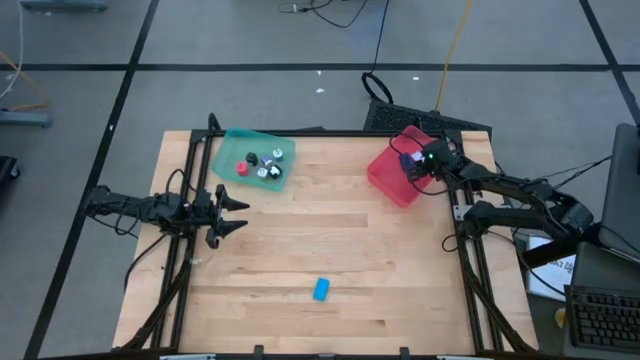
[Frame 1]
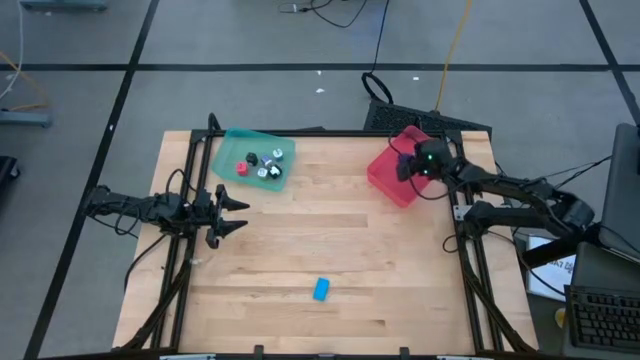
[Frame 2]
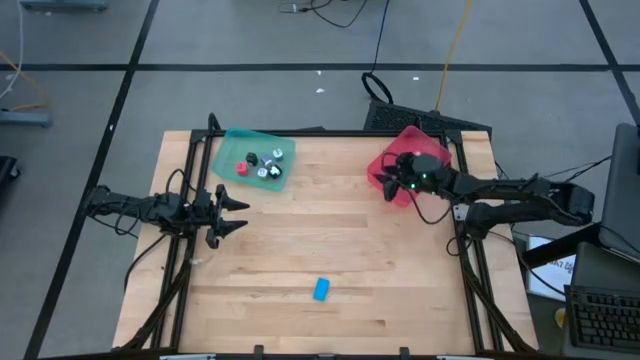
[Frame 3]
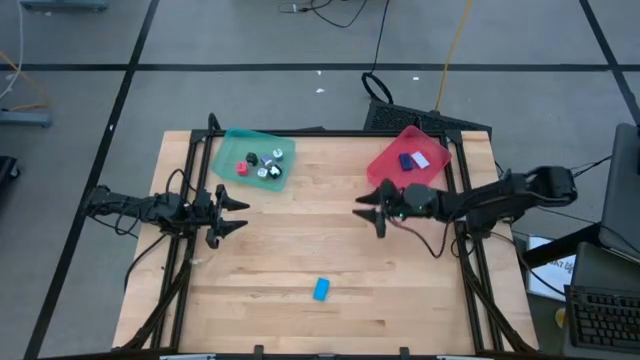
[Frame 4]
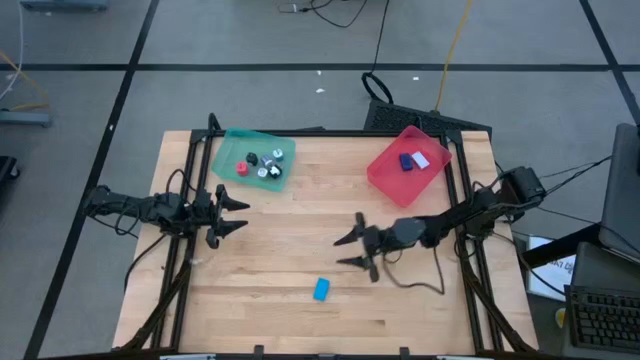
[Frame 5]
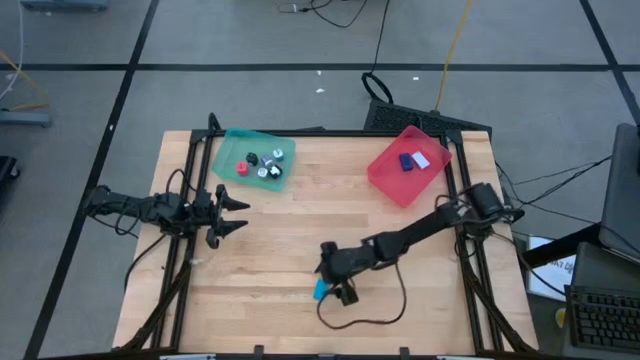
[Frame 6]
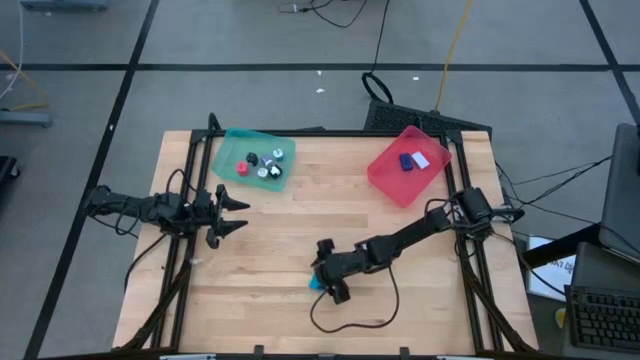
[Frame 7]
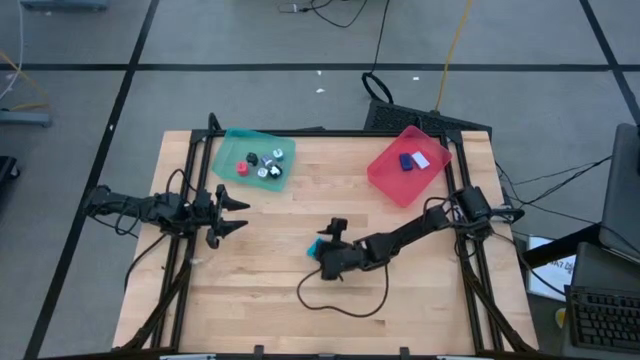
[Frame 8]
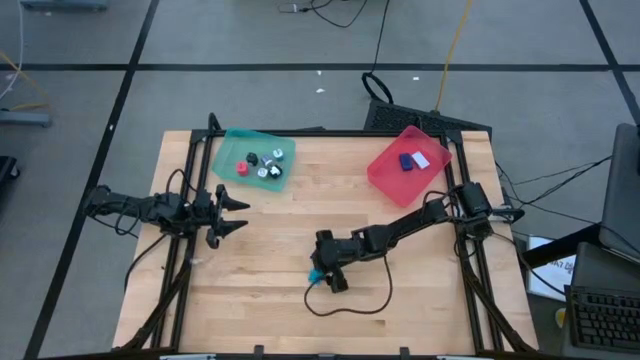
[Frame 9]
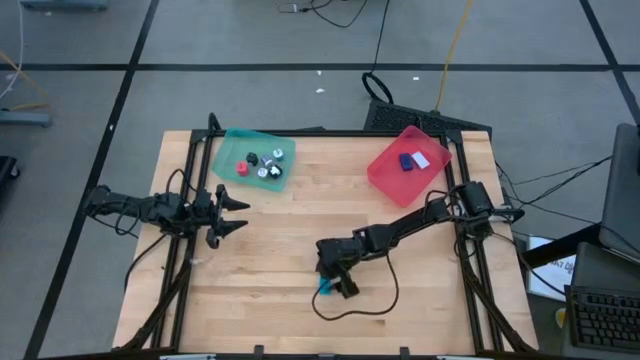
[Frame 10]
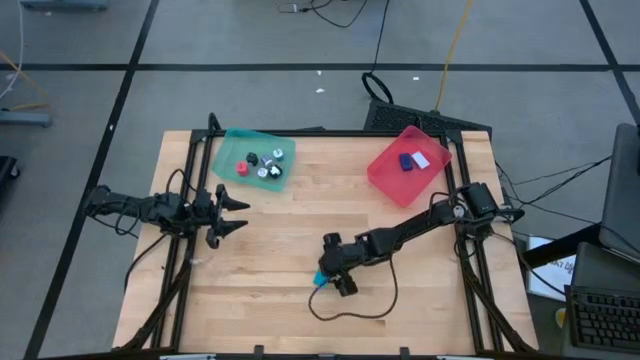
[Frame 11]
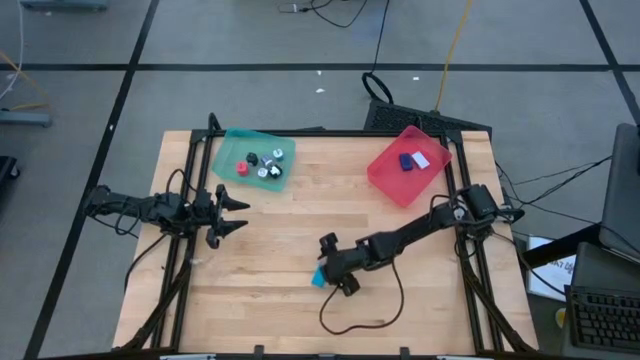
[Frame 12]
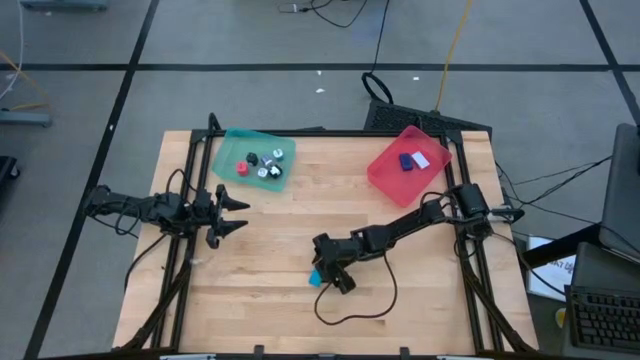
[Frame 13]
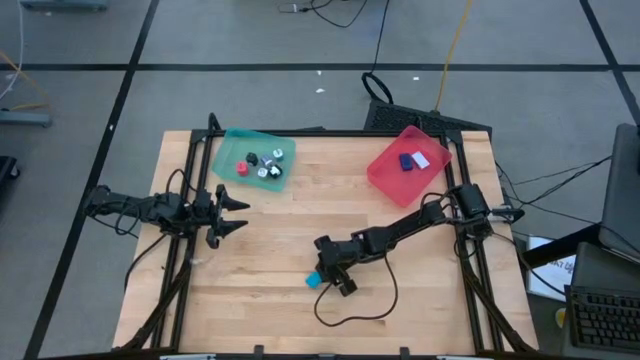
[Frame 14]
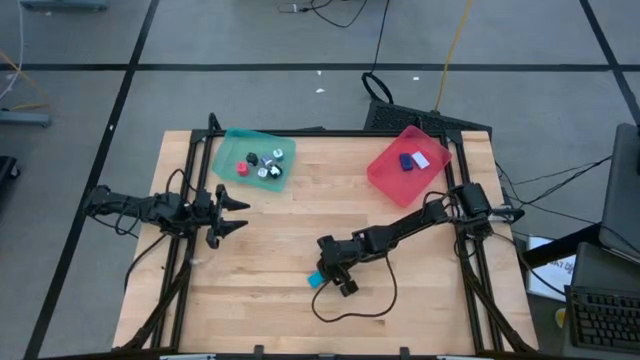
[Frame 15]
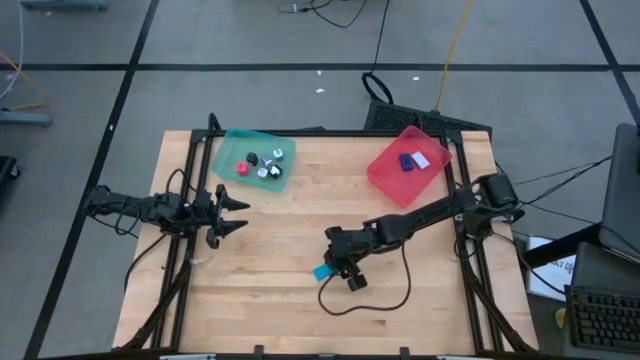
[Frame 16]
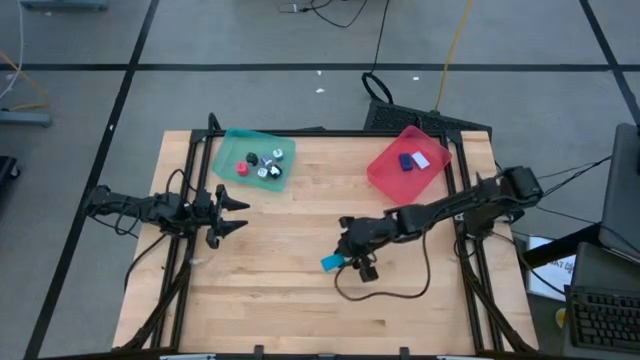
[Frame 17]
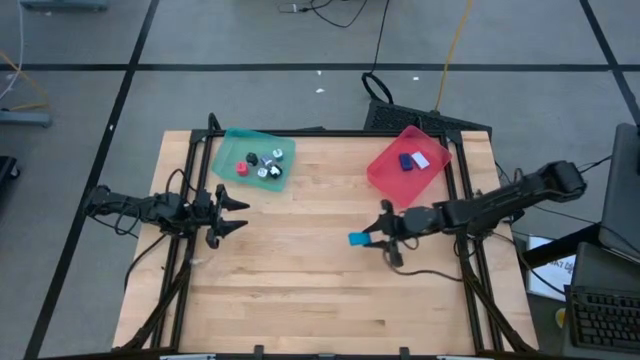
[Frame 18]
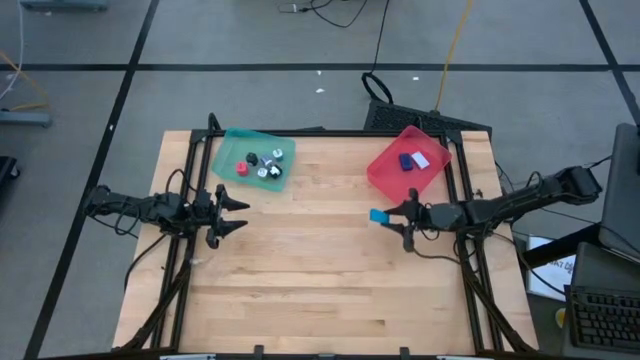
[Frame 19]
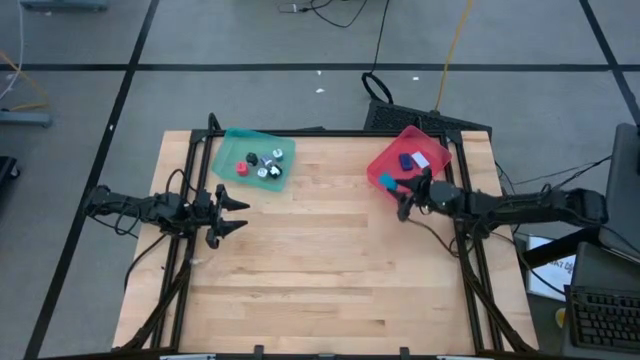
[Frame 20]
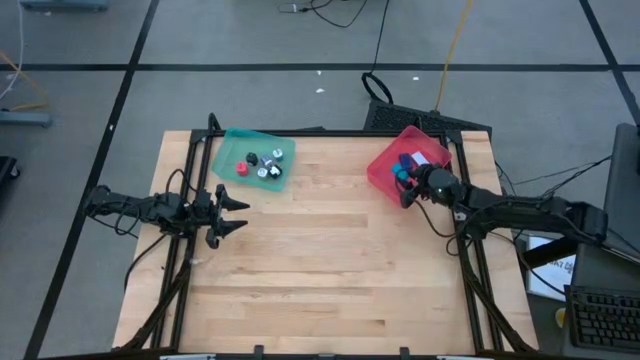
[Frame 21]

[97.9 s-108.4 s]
Task: Pick & Place Office items
Put the blue digital clock into the red bin

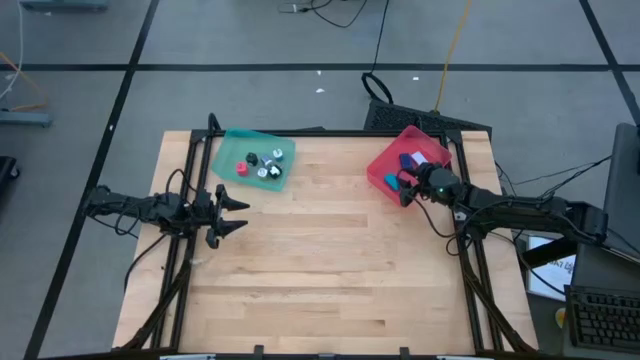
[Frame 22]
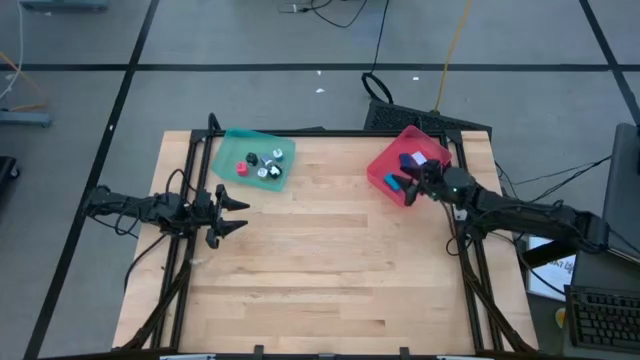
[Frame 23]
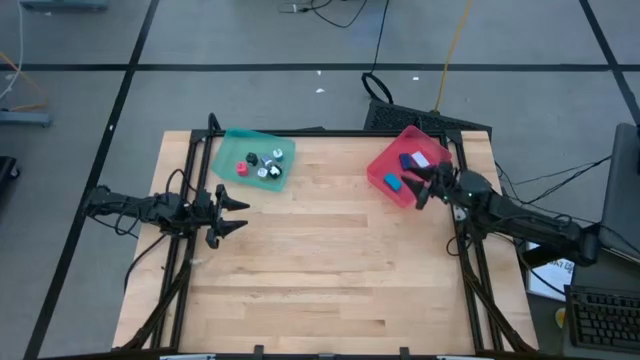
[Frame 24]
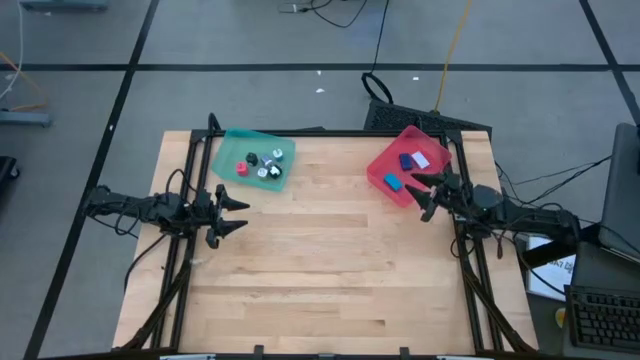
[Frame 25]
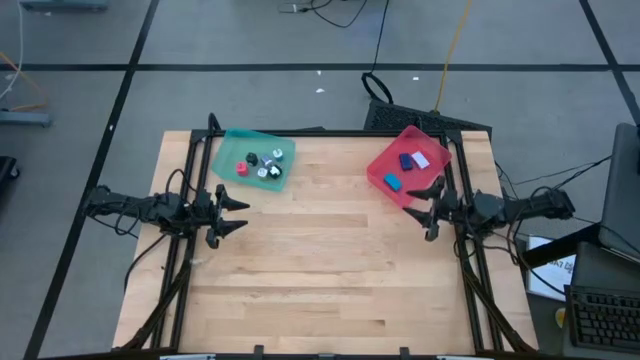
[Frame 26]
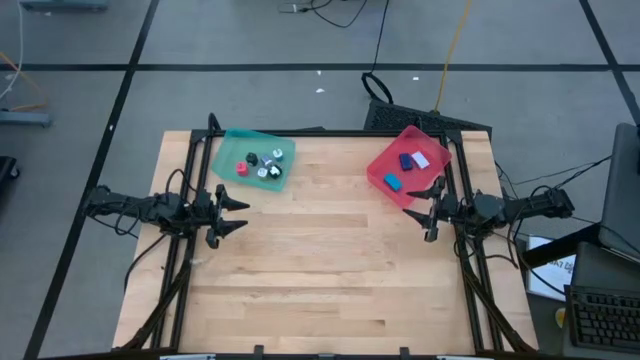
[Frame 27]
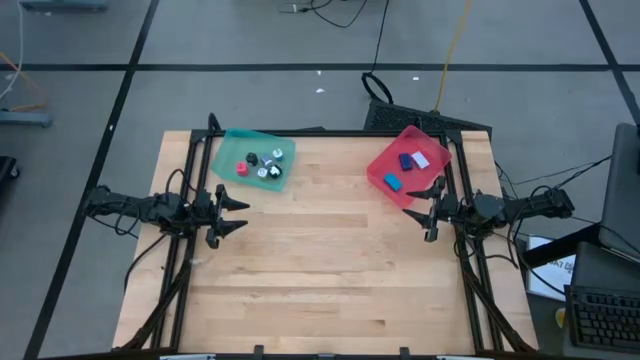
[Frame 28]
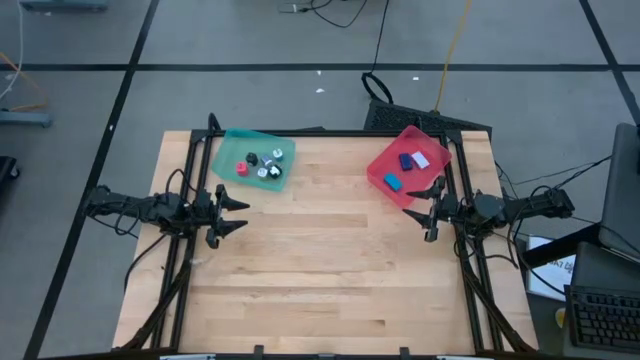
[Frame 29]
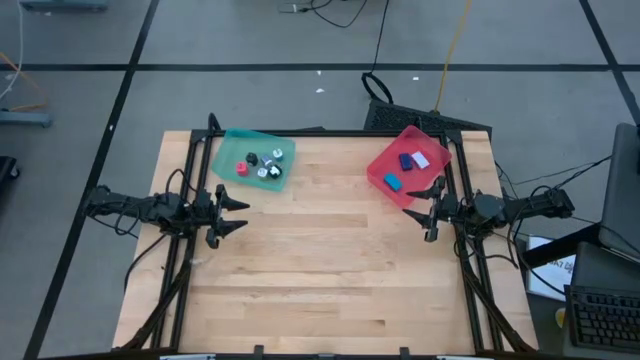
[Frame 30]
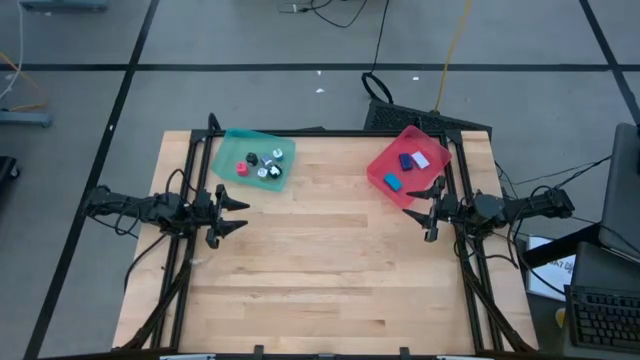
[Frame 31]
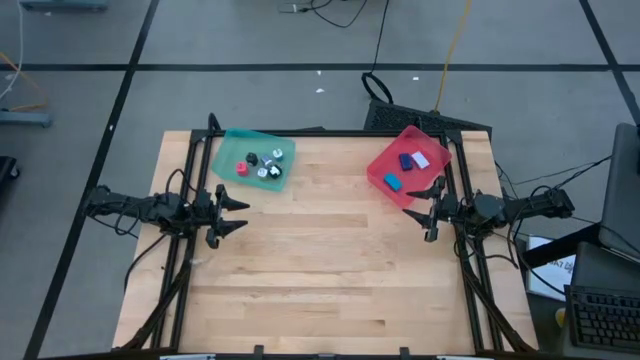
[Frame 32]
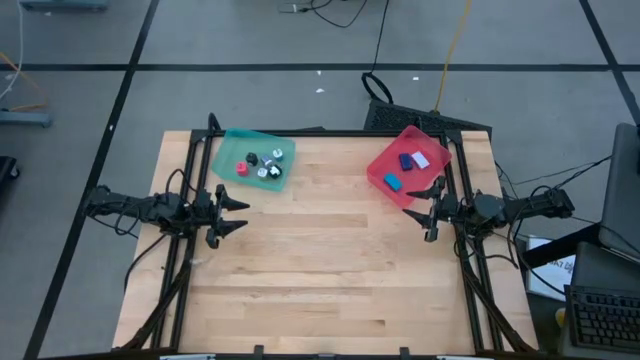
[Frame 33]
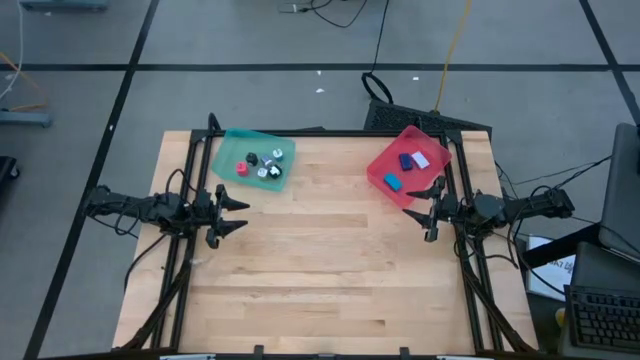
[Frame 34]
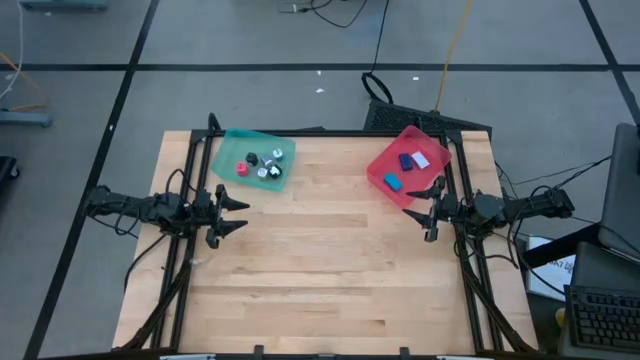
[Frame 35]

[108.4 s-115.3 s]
Return to Home Position

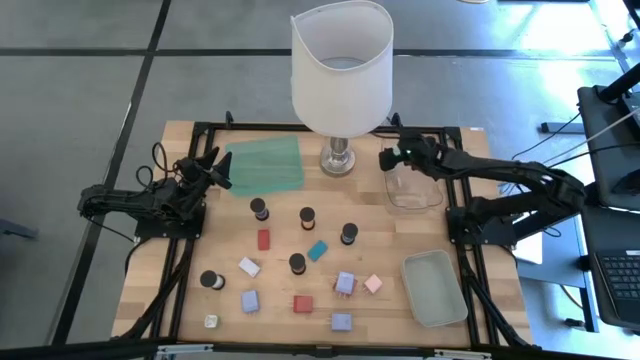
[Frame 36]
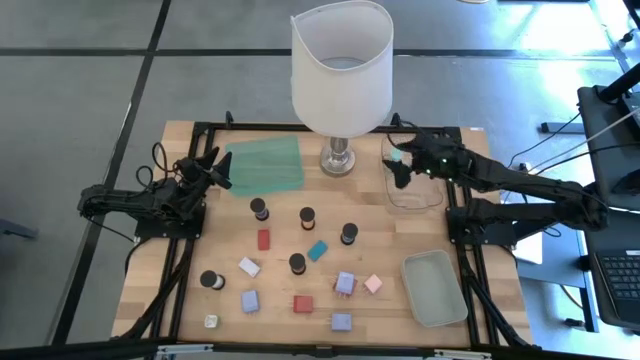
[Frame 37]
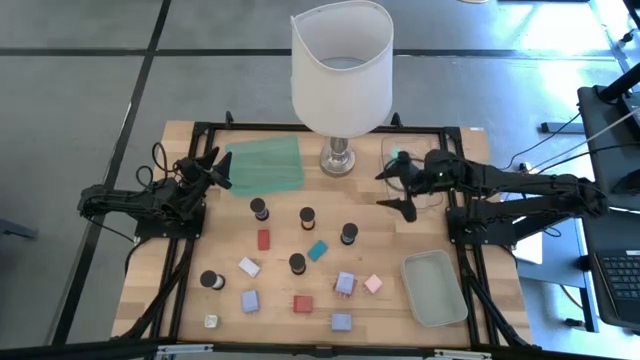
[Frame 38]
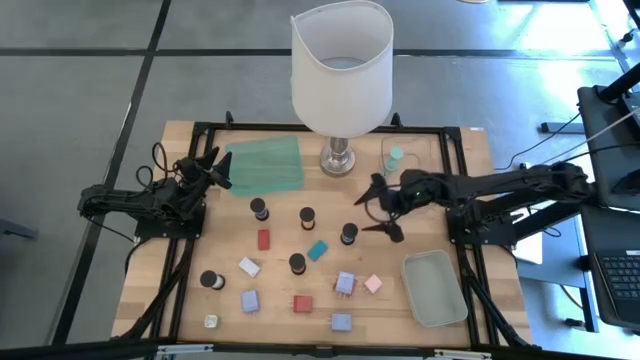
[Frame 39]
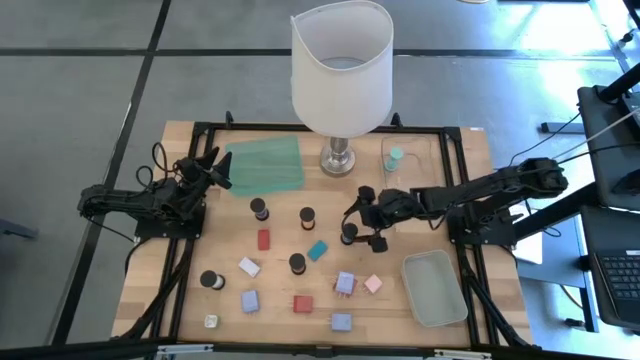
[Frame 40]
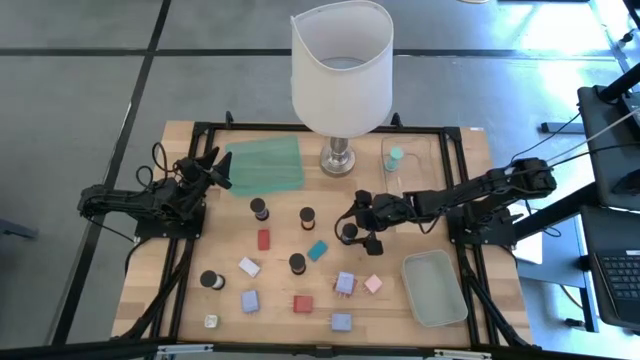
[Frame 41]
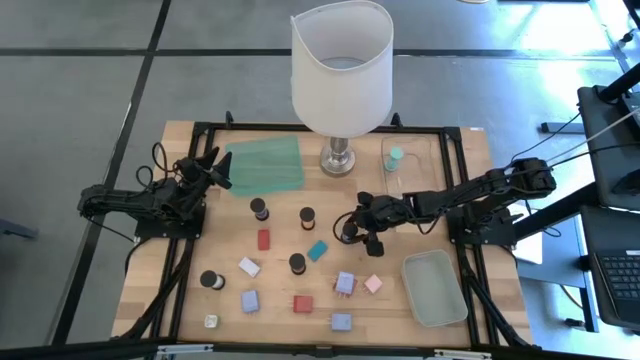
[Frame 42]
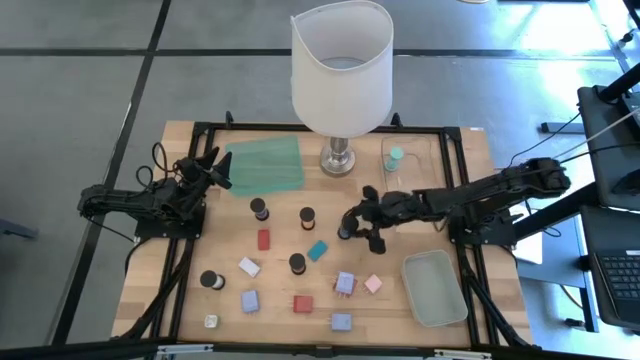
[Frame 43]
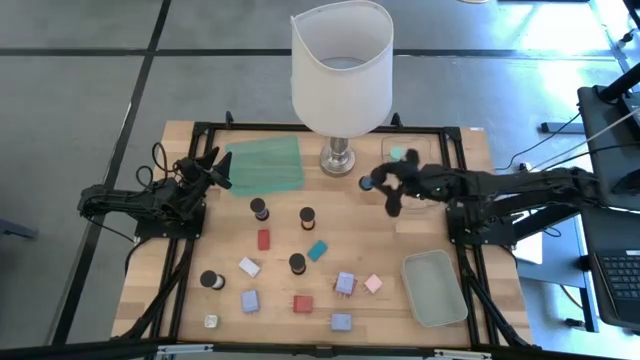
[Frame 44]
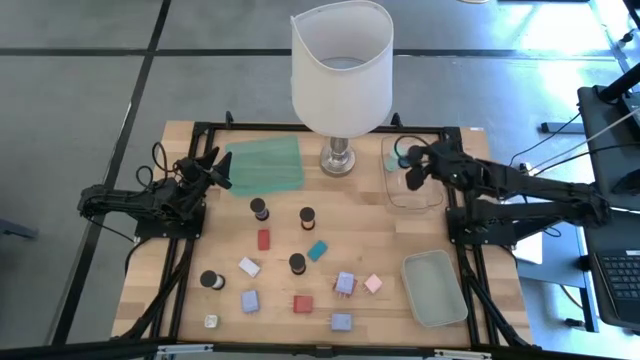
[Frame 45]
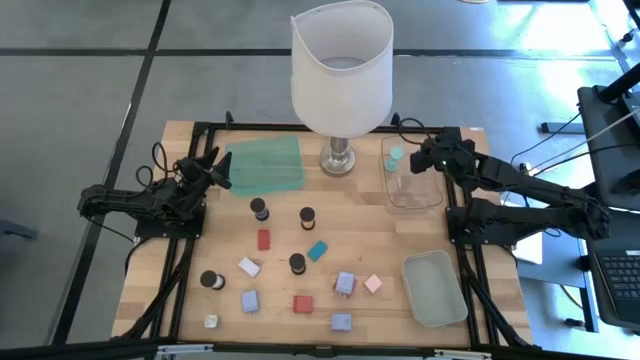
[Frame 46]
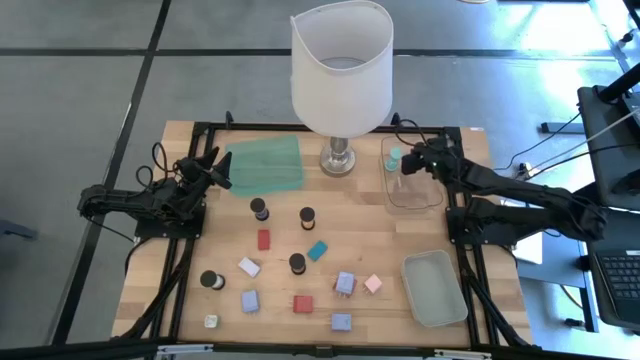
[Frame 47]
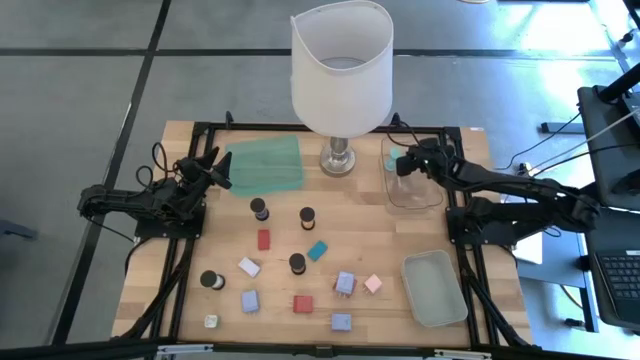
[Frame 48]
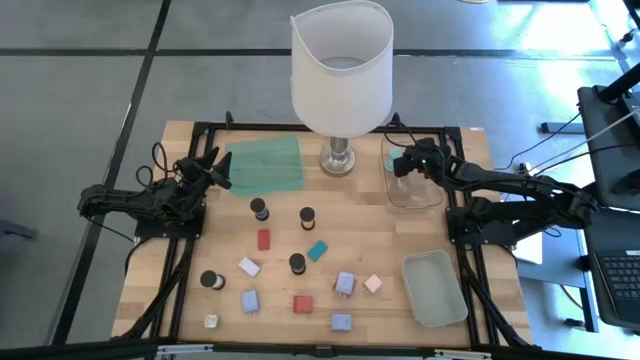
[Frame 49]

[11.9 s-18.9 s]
Task: Pick & Place Office items
Put the blue hourglass into the transparent bin
